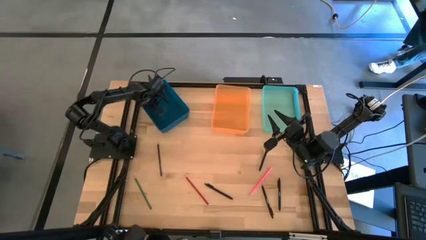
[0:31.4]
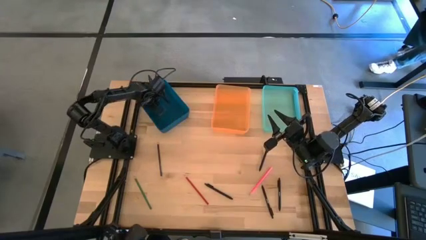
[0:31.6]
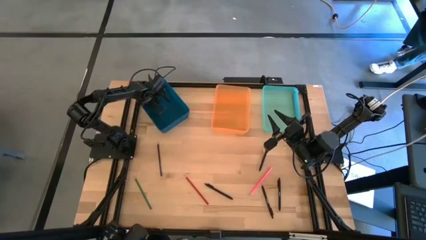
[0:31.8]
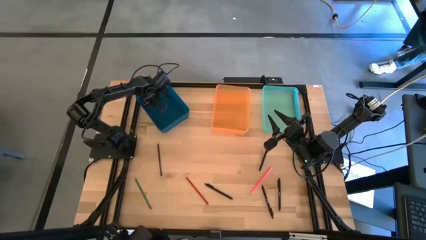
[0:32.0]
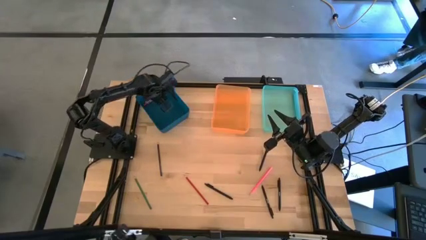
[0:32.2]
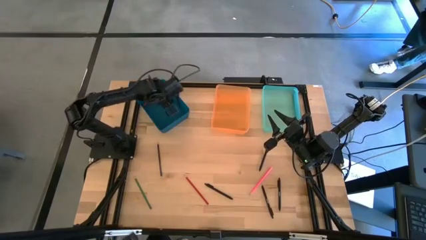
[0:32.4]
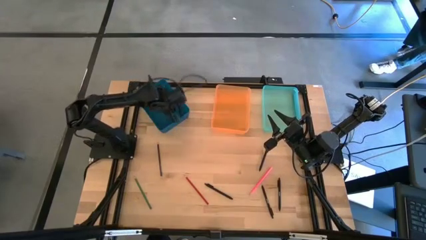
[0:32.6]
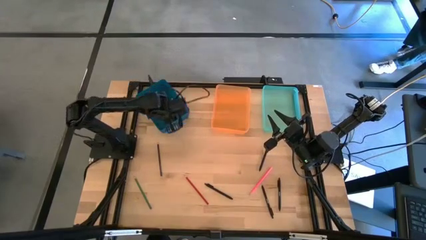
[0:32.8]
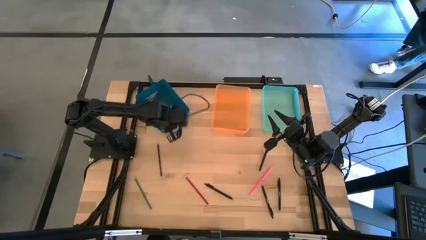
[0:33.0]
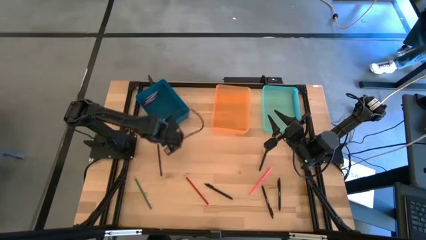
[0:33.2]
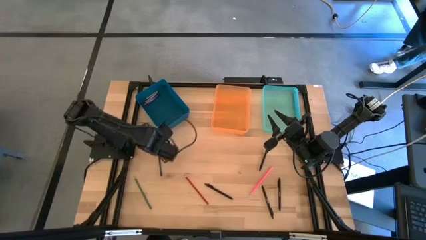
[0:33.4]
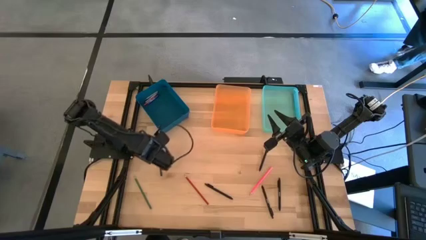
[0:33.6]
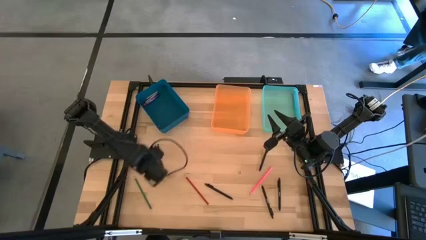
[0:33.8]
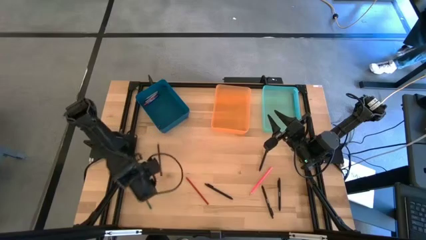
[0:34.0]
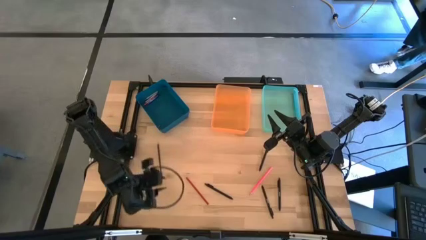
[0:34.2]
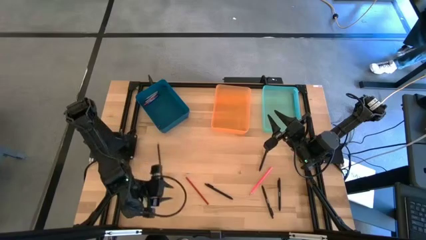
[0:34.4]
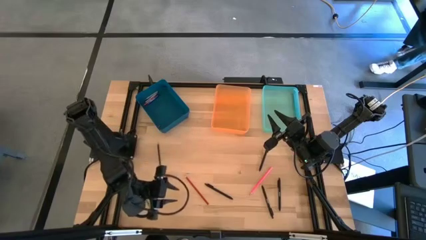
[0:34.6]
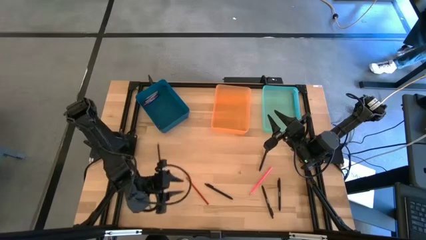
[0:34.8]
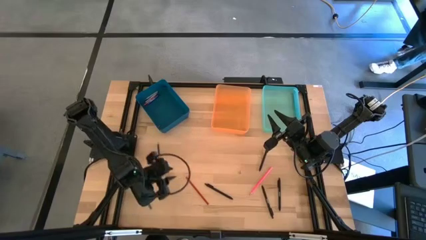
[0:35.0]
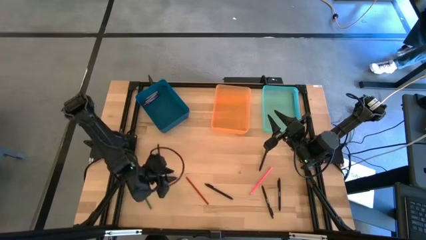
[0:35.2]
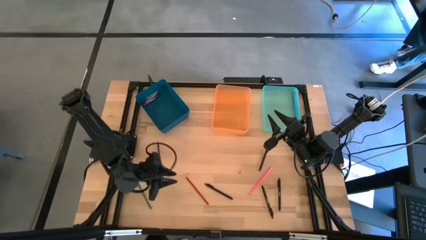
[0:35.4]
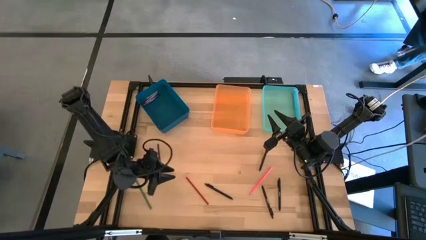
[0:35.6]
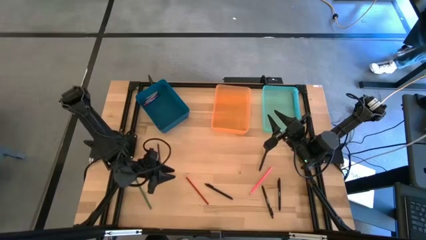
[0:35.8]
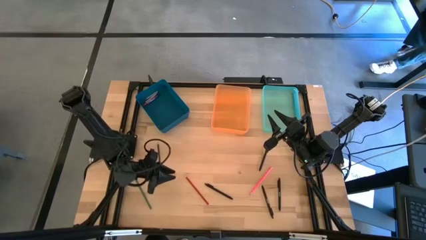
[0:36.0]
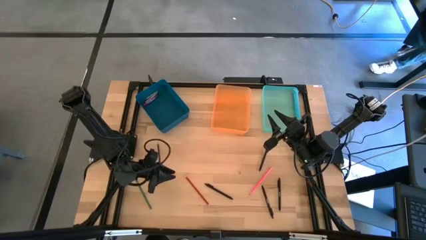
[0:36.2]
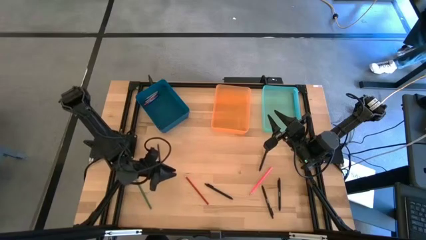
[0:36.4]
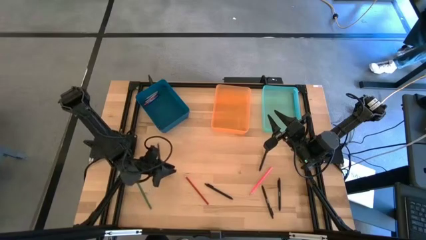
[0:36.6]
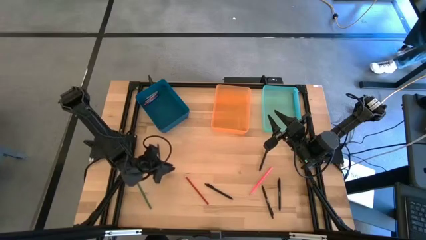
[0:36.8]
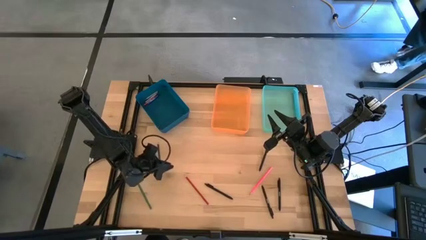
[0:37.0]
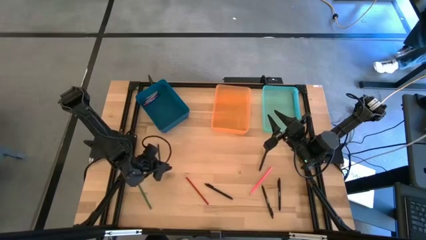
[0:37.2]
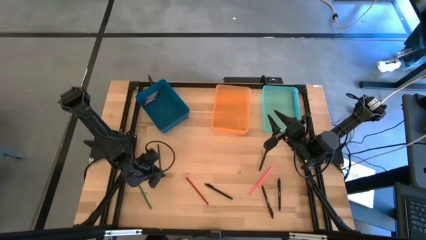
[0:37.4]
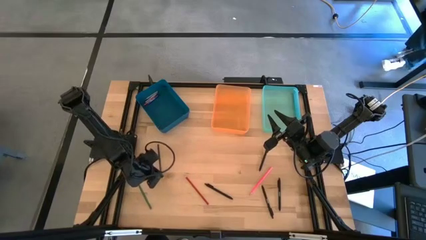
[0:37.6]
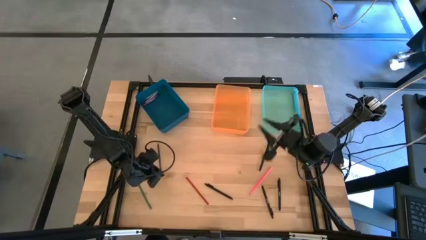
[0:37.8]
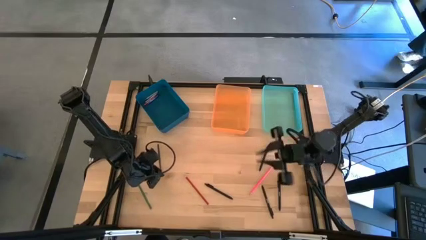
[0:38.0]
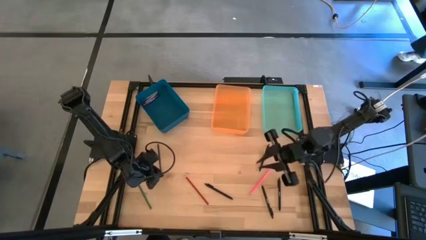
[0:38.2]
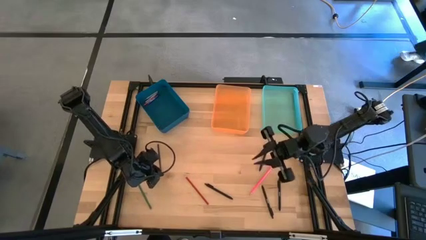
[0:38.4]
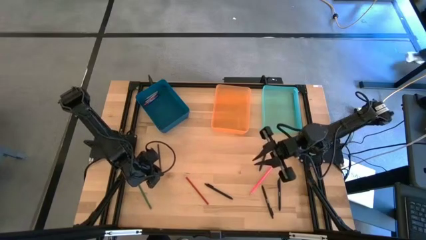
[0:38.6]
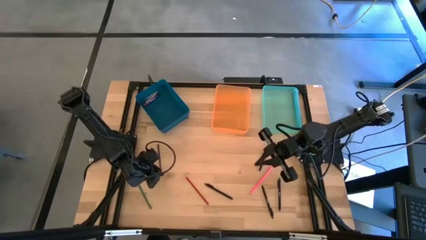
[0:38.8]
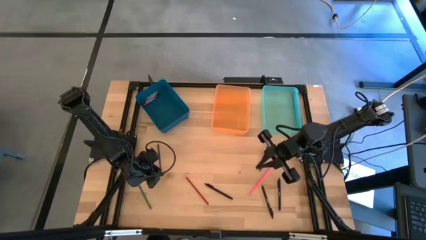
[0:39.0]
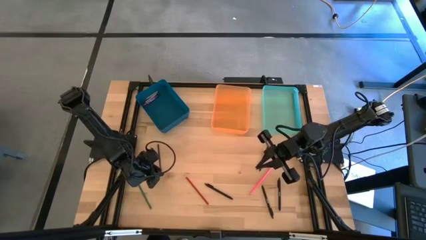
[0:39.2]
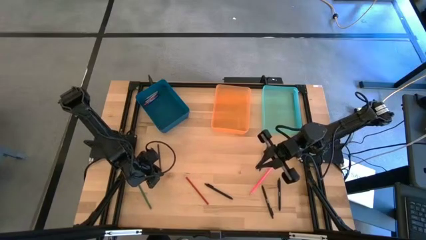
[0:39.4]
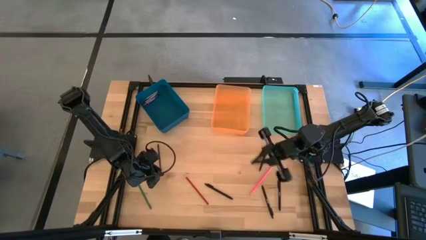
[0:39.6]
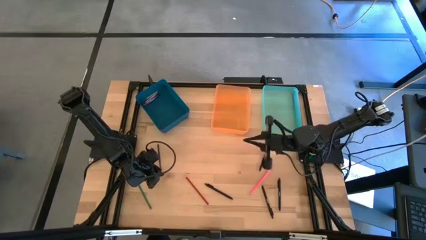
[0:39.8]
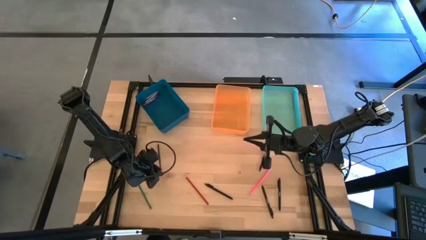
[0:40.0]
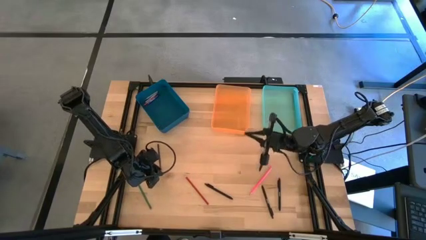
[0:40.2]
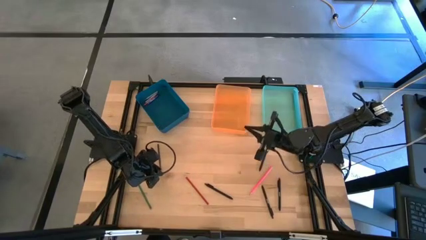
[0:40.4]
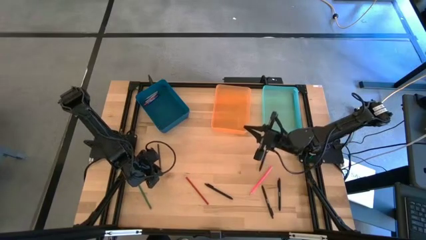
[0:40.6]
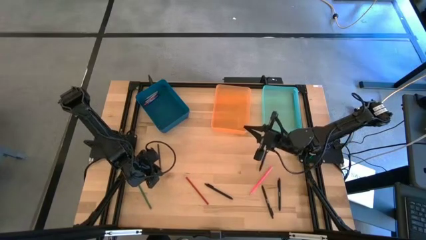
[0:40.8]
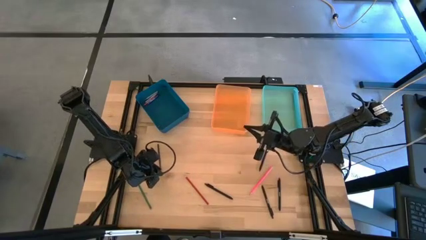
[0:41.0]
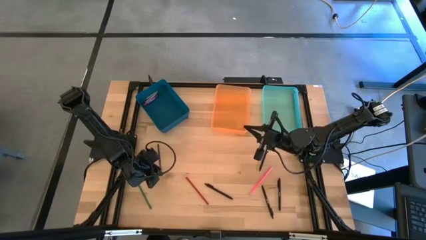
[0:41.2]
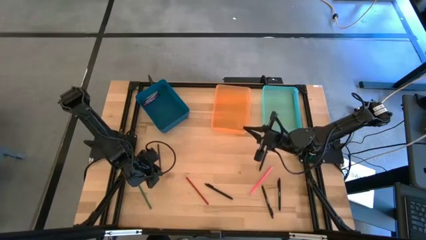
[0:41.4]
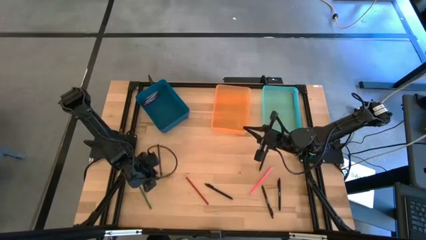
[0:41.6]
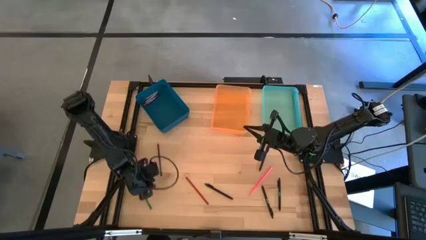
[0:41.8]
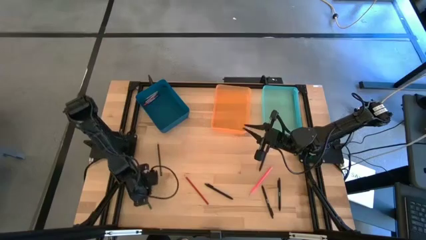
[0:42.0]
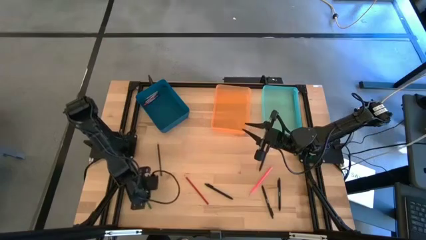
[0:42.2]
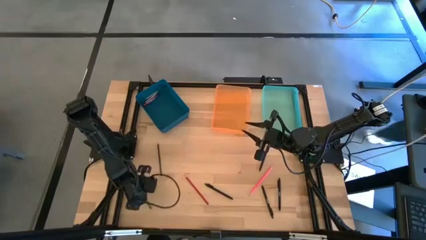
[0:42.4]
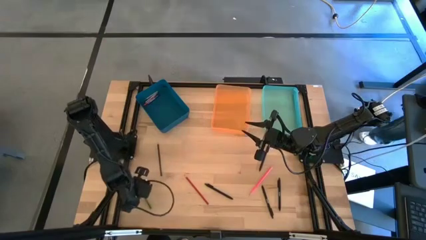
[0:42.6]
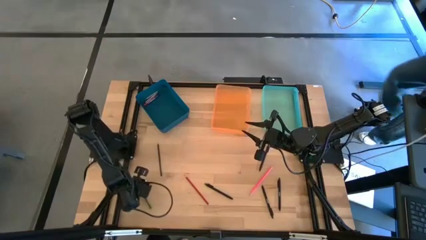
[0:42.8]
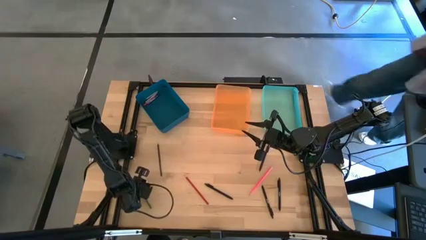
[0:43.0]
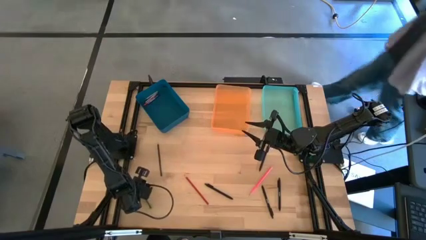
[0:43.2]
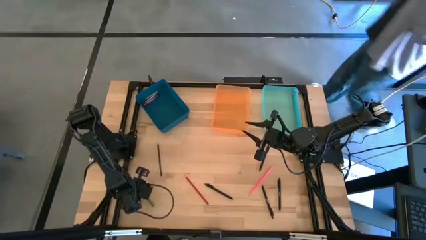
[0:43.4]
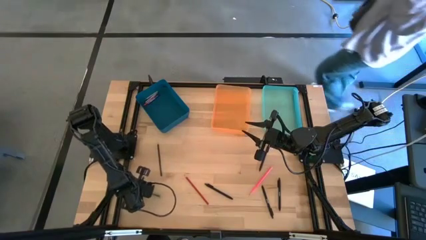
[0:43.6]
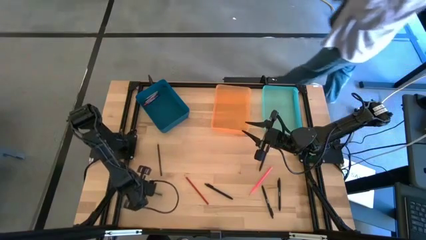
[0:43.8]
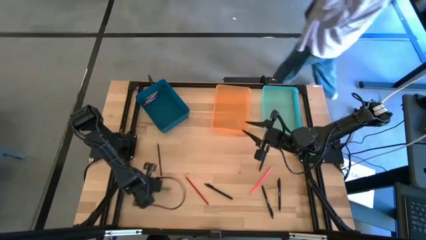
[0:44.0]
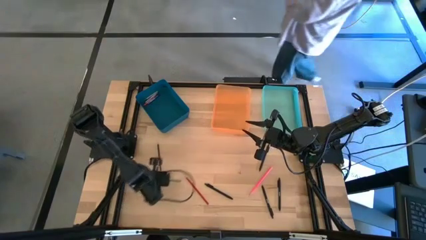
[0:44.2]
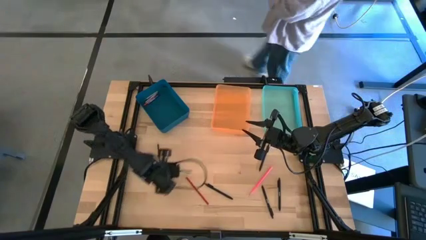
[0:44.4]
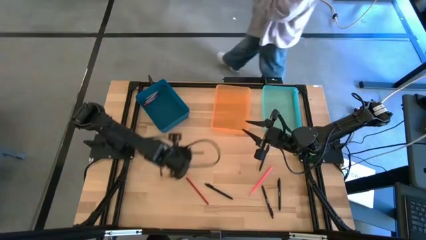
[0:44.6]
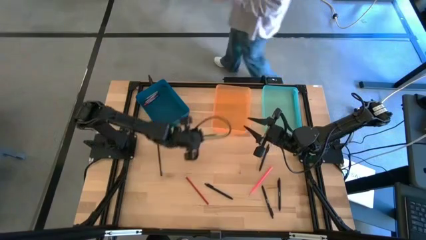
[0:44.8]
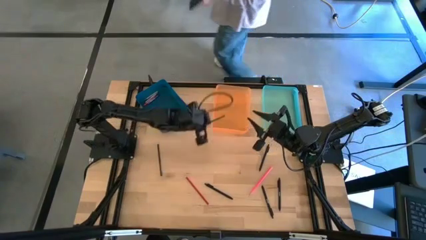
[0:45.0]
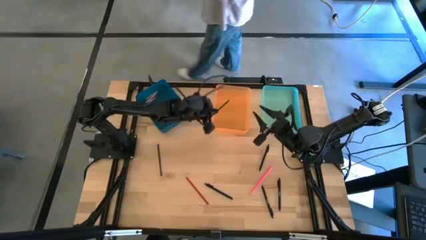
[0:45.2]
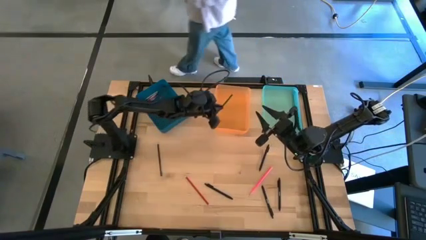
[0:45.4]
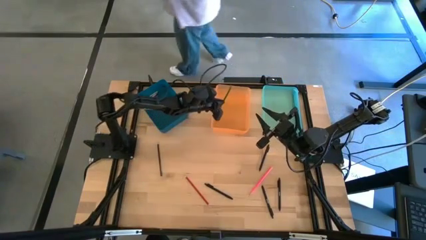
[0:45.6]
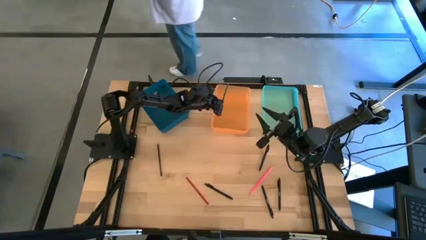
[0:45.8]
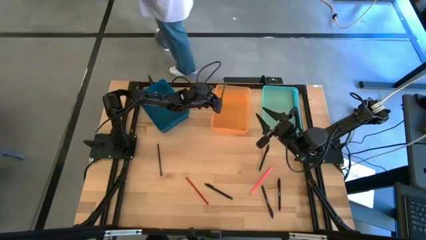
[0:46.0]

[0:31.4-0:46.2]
Task: Sort crayons/erasers/pens/pencils in bins
Put the green colored pencil into the orange bin

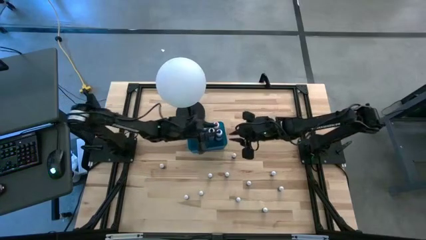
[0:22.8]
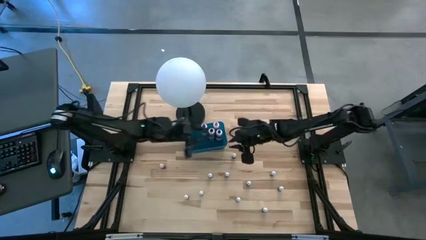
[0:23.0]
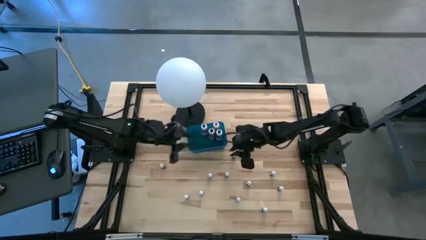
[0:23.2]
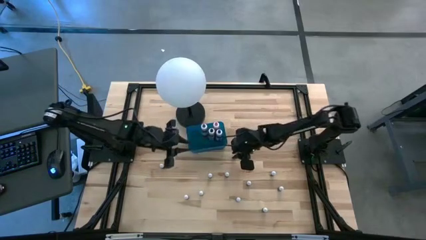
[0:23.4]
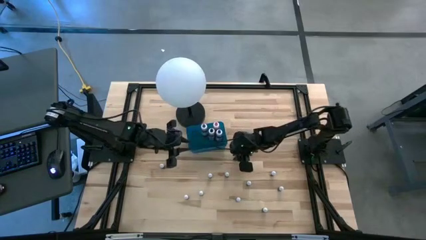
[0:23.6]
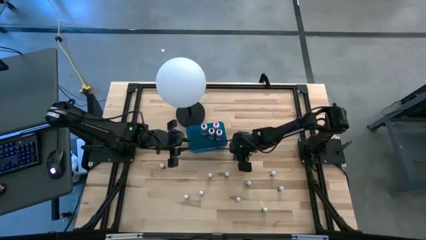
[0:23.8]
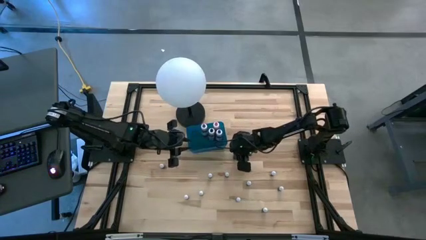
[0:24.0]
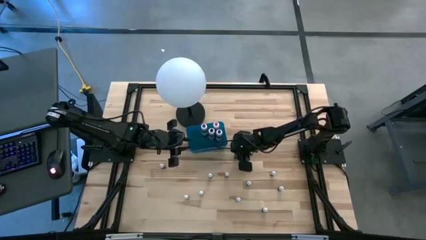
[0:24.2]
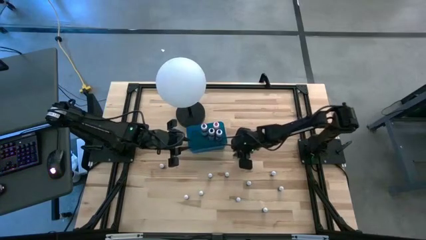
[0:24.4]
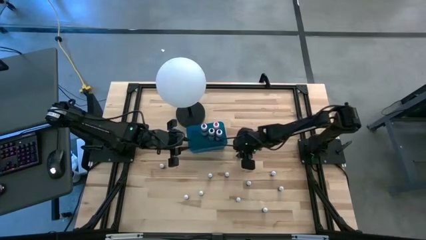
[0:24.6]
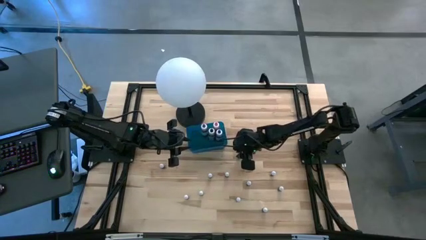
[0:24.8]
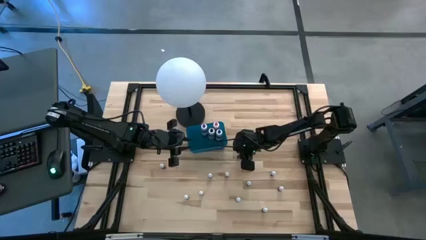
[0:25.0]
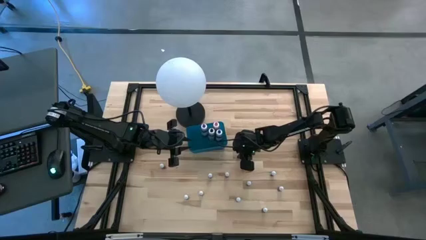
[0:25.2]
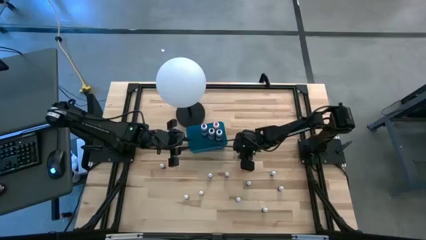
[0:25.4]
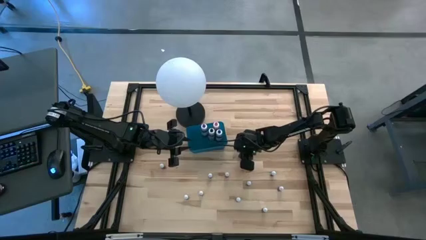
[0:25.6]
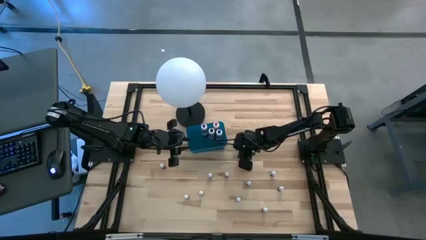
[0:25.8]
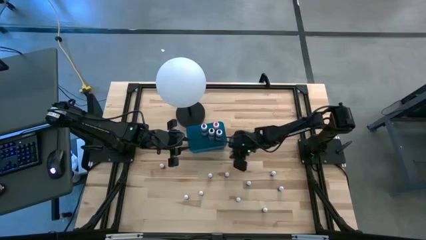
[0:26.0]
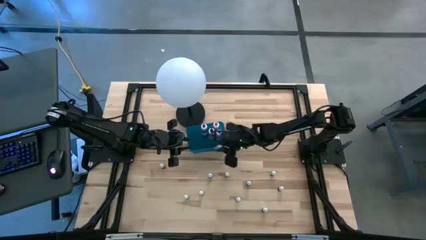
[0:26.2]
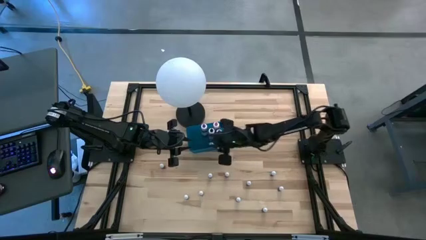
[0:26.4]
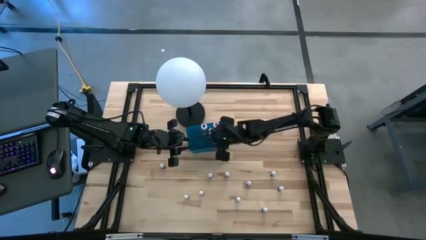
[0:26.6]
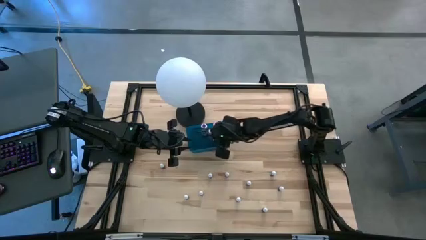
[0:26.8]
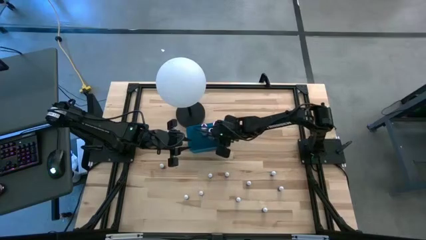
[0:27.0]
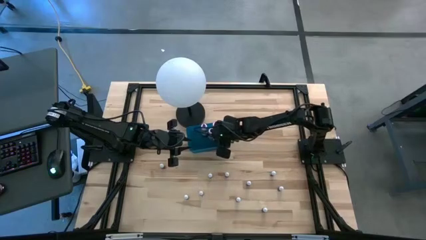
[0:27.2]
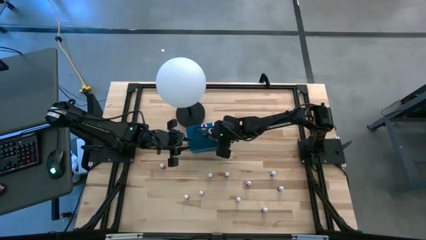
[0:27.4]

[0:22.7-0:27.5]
Task: Pick & Place food coloring
Put the small black food coloring bottle into the blue container
